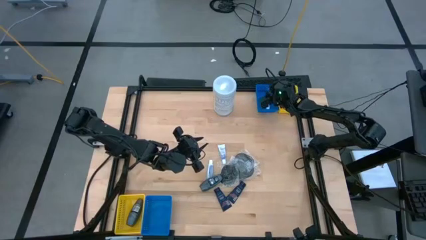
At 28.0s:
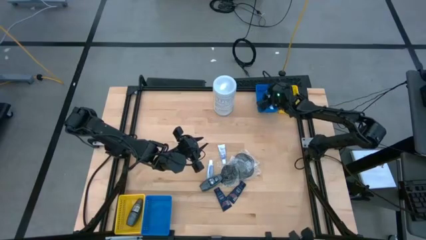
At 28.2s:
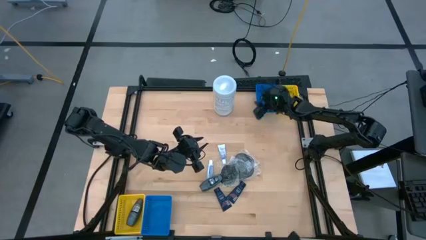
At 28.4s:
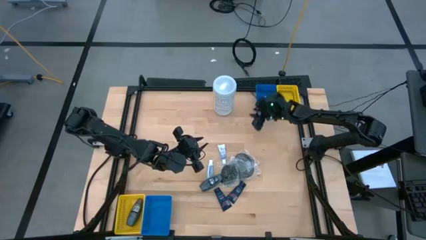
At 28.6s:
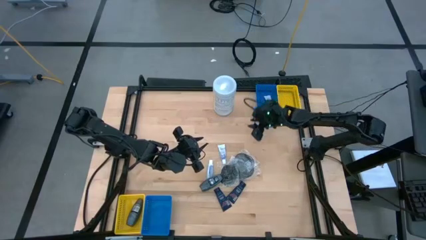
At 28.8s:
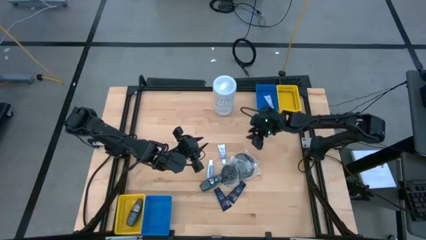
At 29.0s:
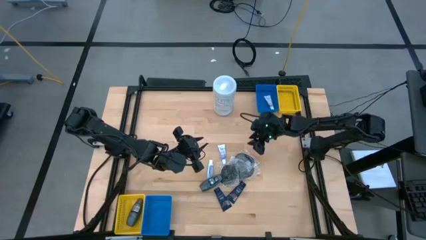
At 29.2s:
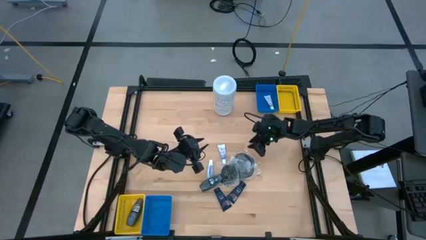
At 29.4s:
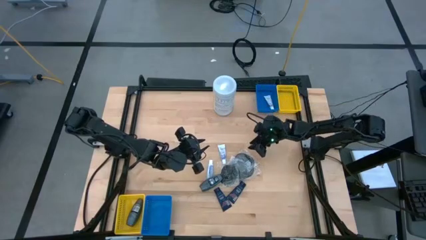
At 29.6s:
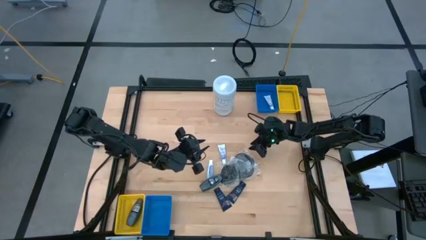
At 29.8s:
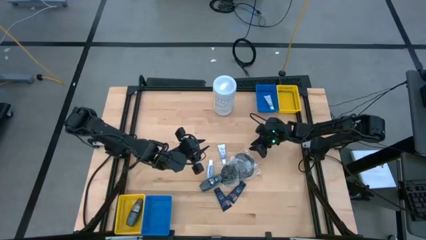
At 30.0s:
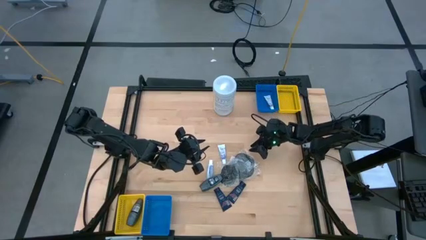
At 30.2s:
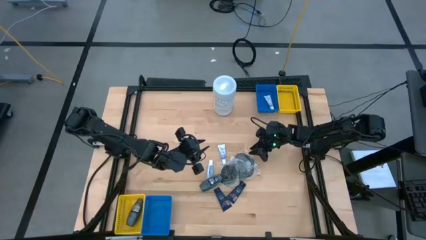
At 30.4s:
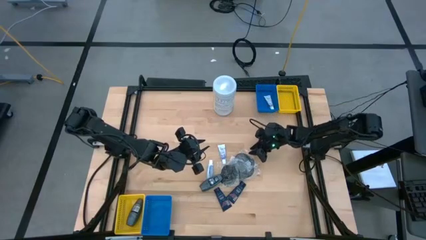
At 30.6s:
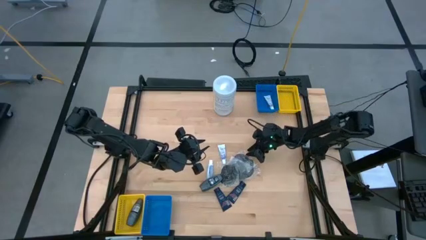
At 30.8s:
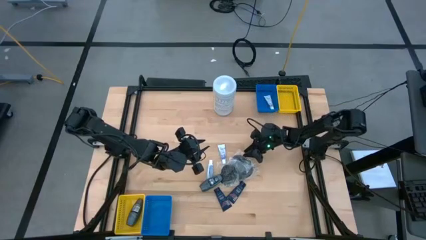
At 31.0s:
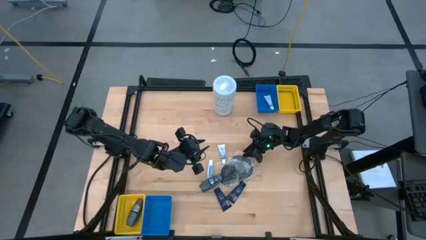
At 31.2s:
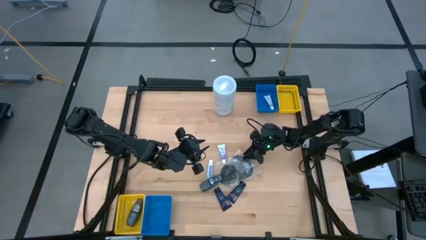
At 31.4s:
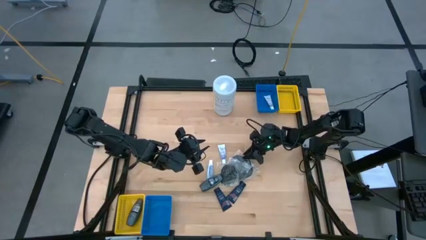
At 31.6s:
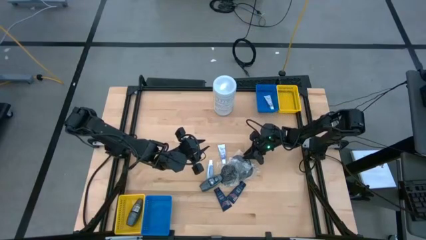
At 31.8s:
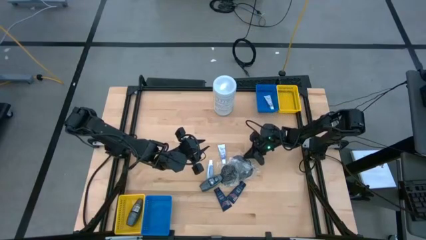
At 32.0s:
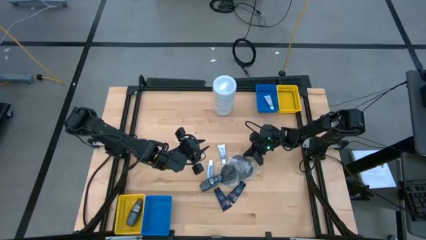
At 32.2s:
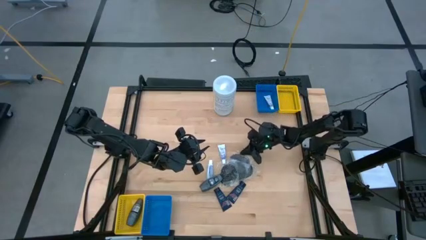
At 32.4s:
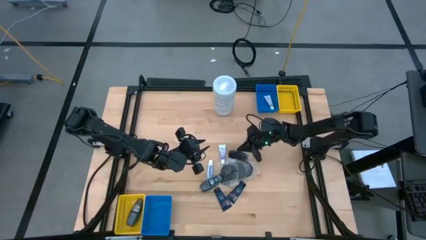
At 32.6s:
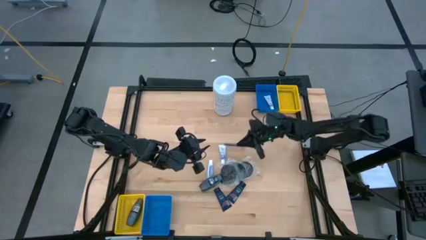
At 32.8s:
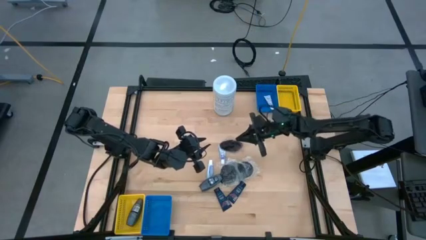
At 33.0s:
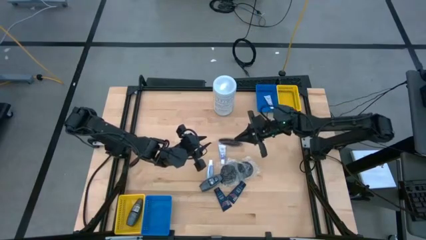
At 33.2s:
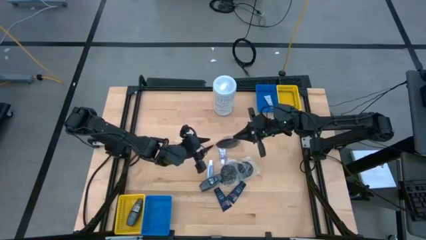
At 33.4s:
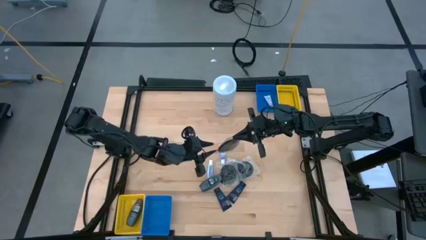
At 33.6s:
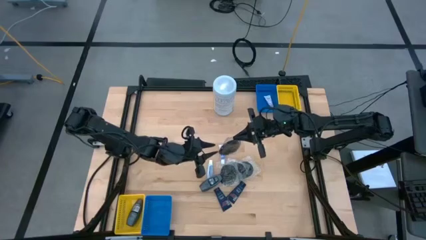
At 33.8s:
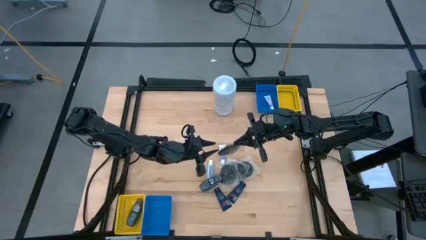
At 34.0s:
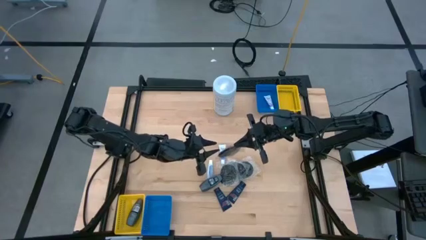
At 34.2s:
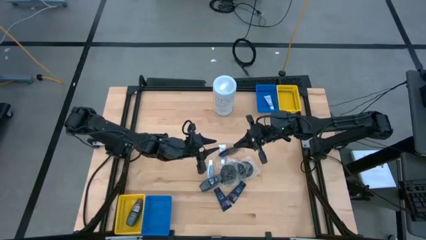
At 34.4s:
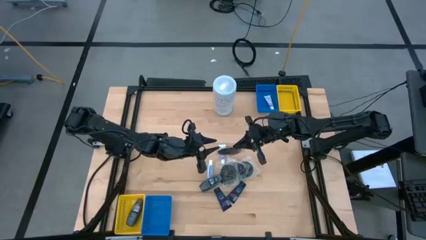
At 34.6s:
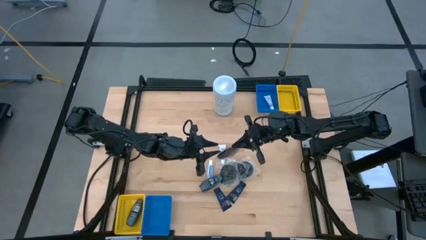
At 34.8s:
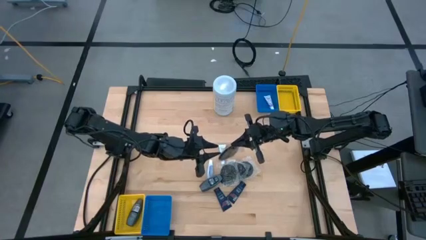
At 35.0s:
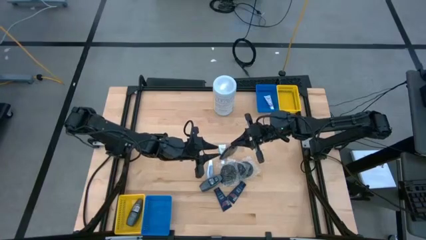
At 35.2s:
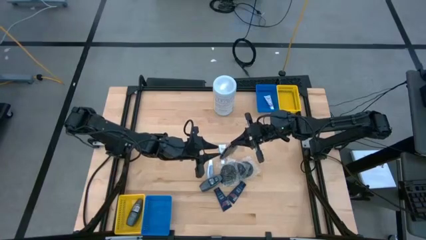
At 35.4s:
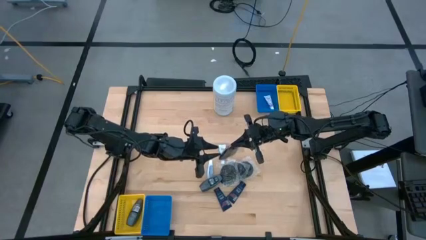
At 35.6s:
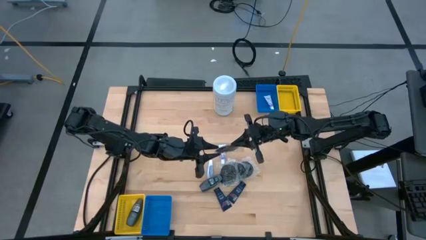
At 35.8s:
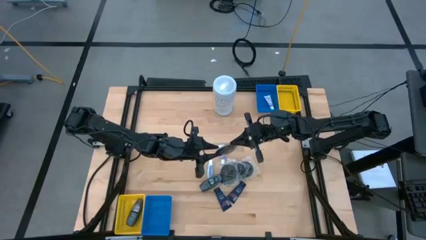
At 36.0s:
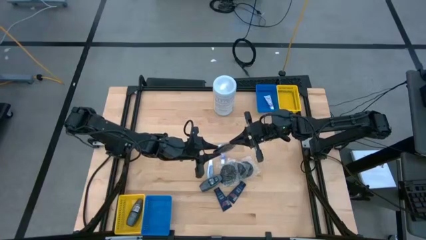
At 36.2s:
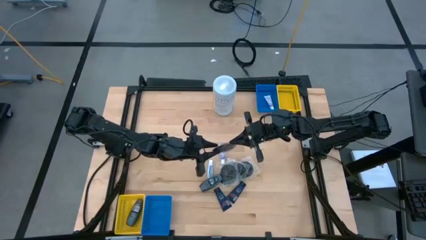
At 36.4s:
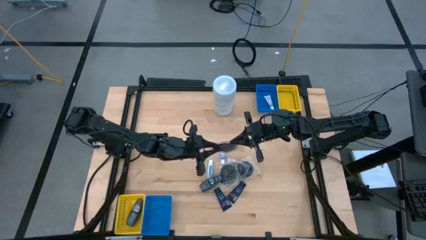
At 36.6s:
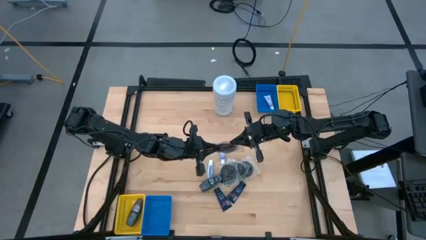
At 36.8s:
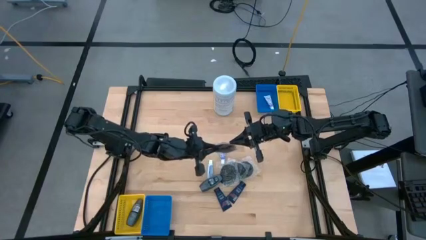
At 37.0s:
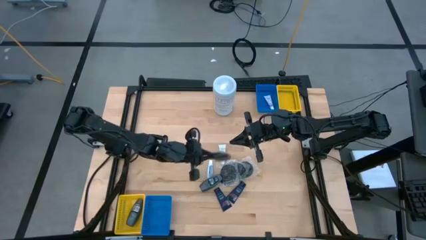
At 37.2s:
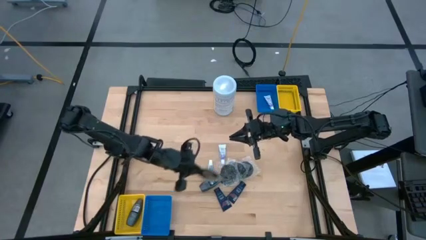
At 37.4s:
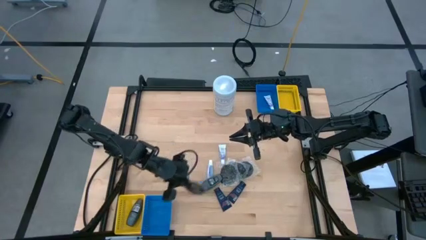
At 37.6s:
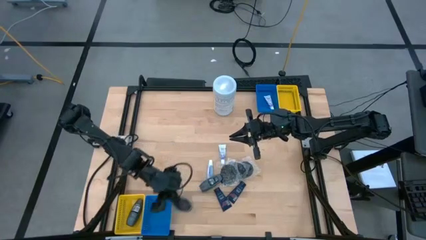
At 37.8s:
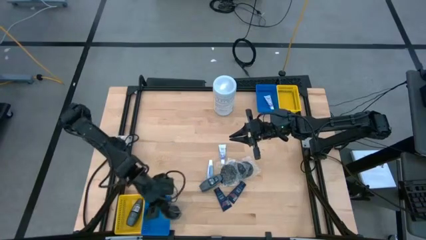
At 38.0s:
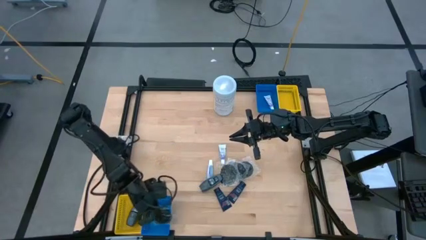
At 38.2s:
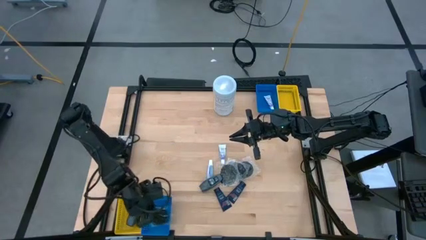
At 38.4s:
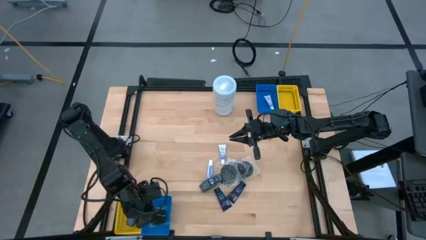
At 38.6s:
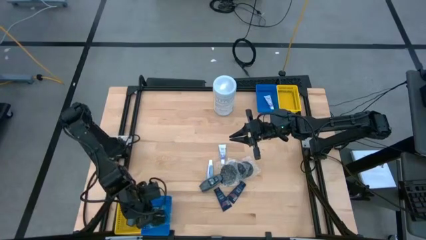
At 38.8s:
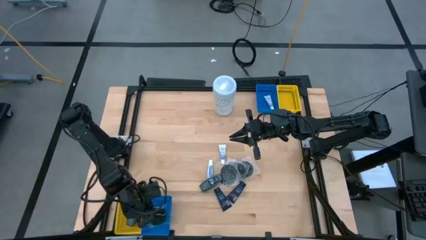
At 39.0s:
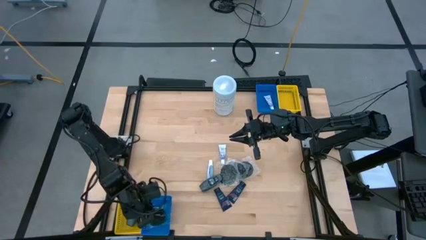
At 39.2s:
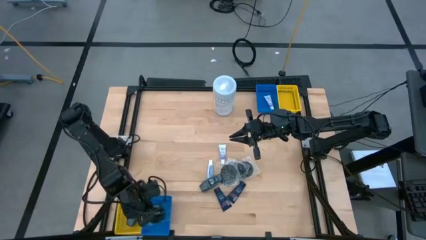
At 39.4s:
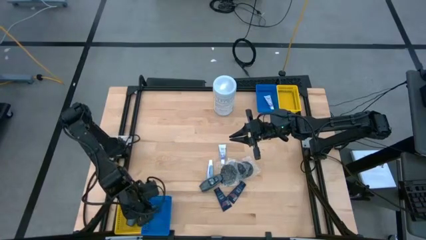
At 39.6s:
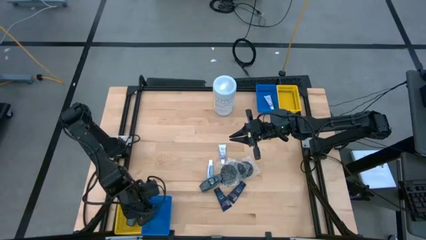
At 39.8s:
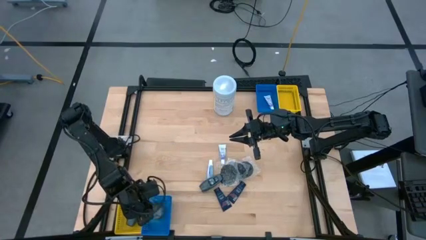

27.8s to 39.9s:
Task: Pick & Place Travel size toiletries
Put the black hairbrush into the bottom blue bin
